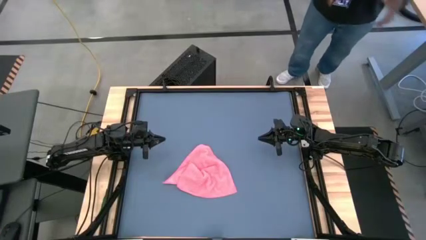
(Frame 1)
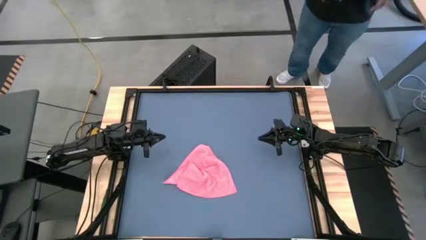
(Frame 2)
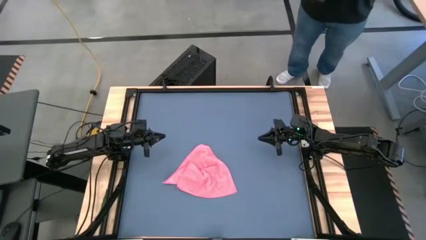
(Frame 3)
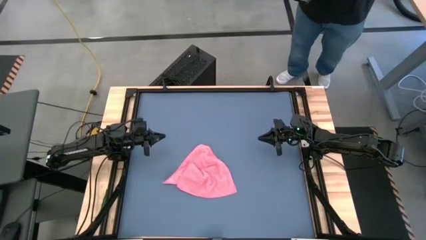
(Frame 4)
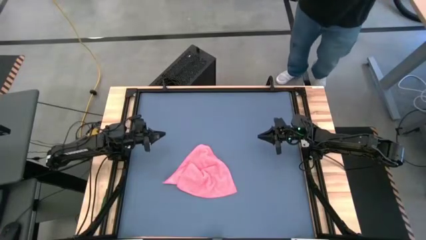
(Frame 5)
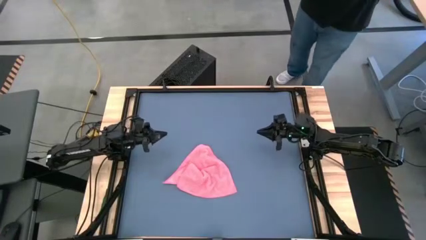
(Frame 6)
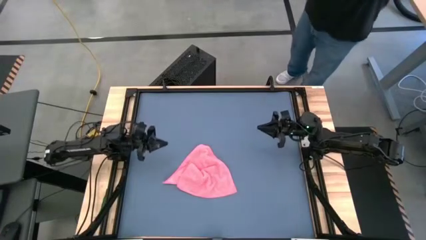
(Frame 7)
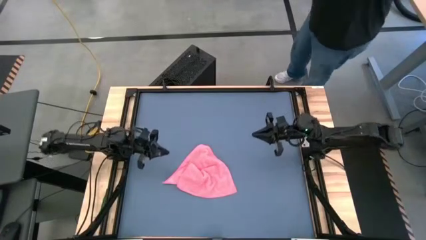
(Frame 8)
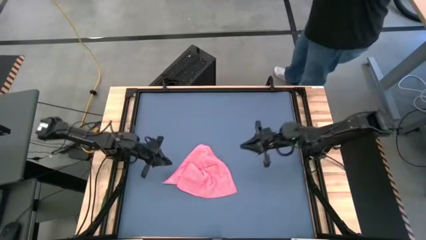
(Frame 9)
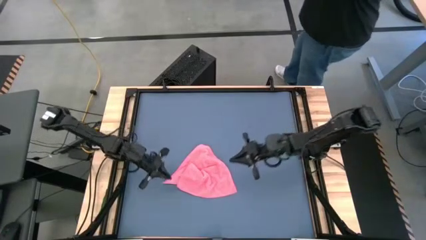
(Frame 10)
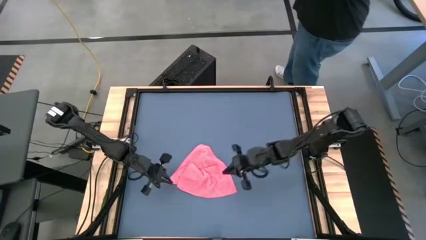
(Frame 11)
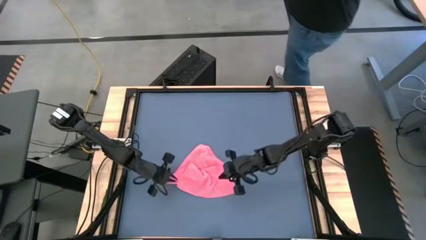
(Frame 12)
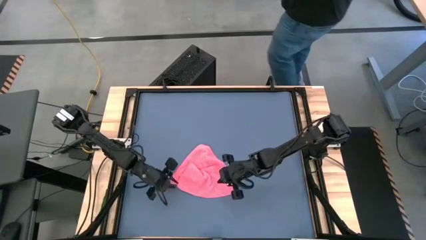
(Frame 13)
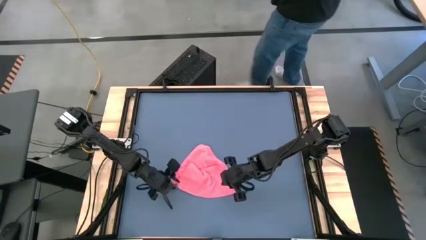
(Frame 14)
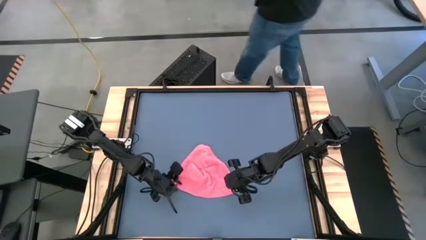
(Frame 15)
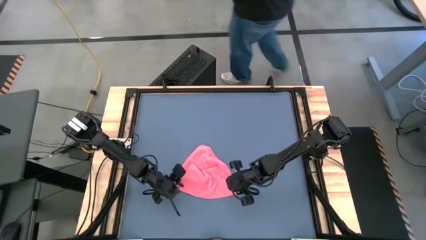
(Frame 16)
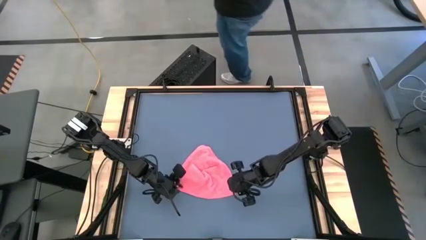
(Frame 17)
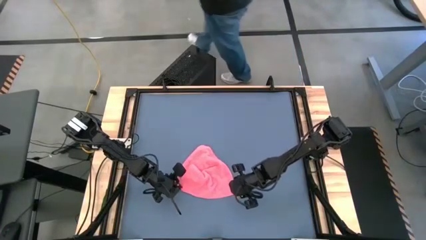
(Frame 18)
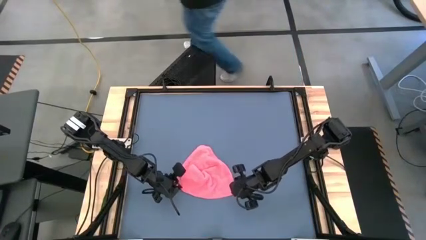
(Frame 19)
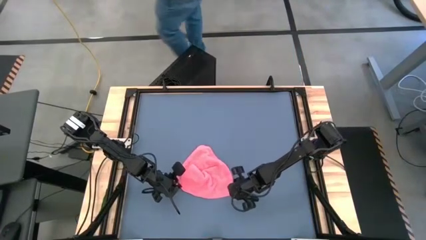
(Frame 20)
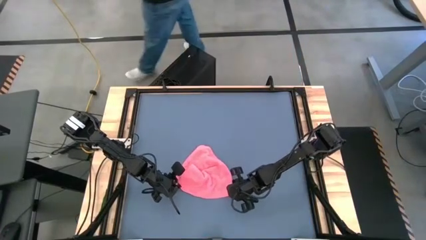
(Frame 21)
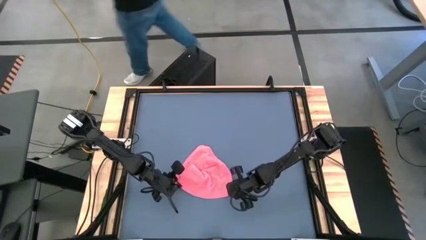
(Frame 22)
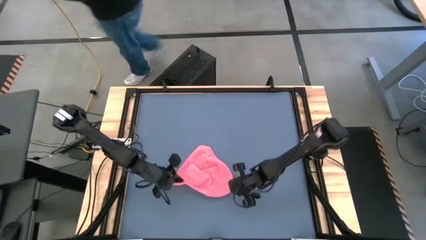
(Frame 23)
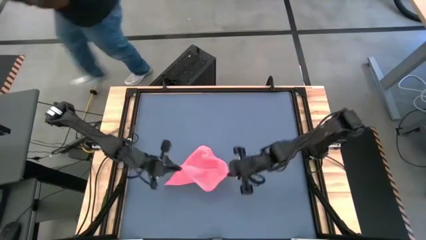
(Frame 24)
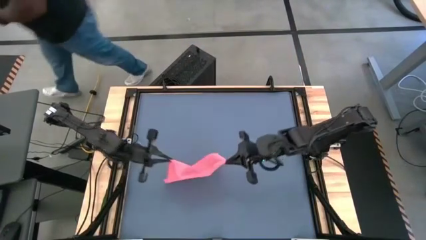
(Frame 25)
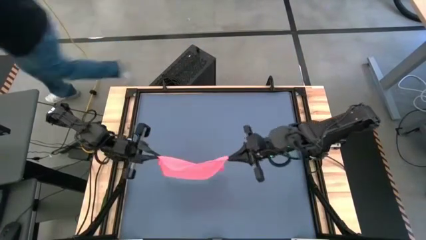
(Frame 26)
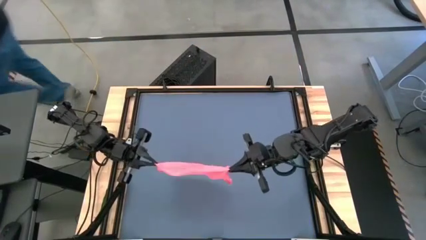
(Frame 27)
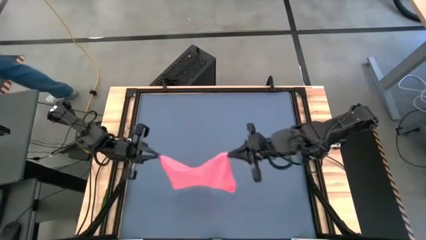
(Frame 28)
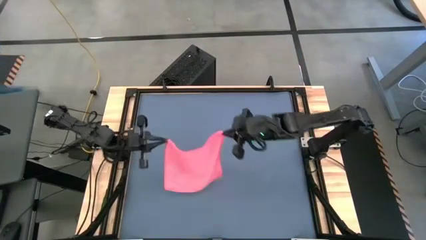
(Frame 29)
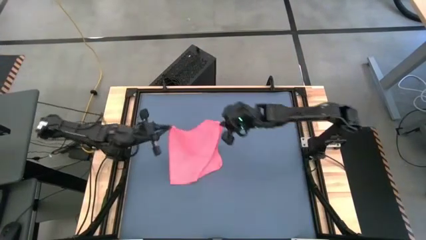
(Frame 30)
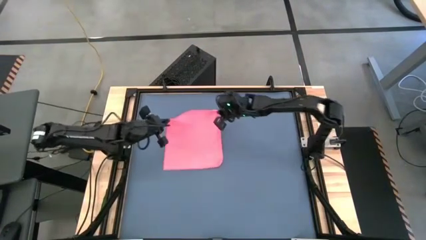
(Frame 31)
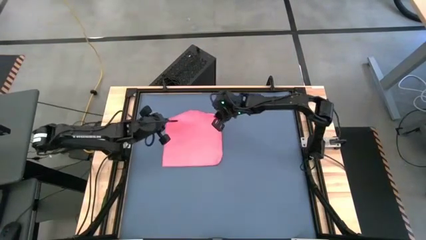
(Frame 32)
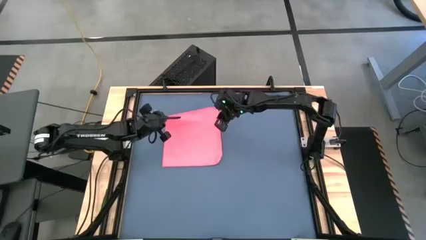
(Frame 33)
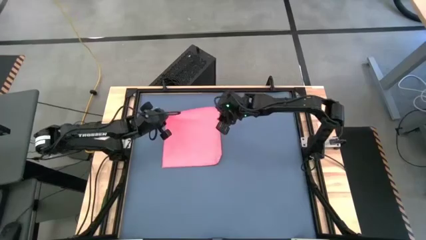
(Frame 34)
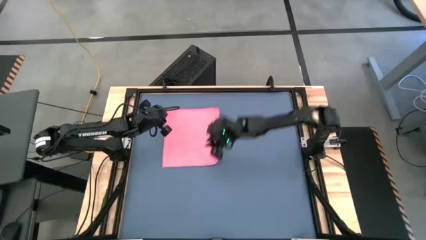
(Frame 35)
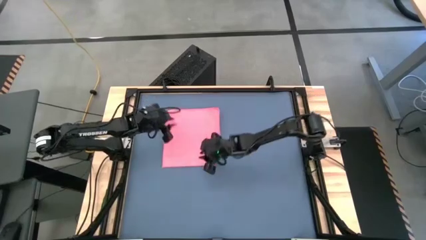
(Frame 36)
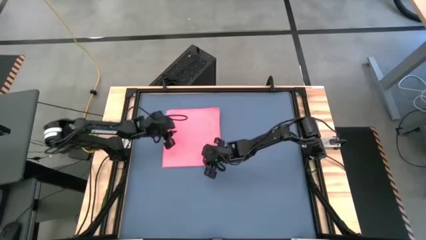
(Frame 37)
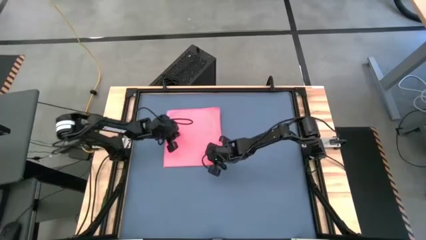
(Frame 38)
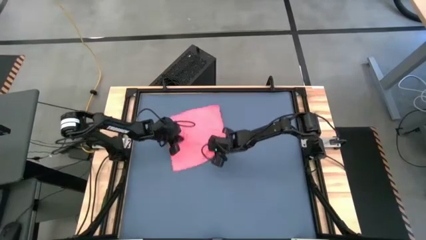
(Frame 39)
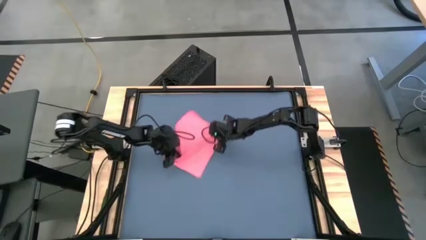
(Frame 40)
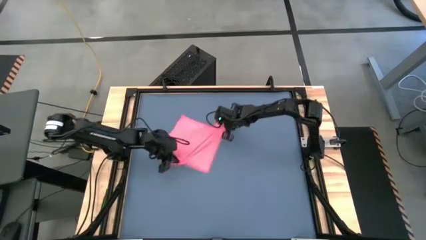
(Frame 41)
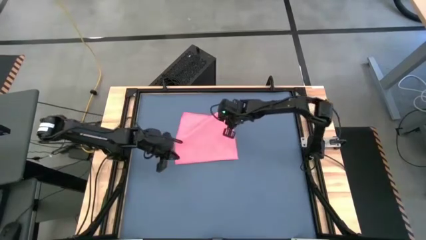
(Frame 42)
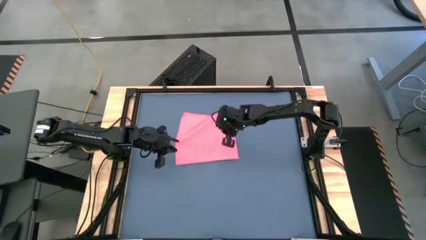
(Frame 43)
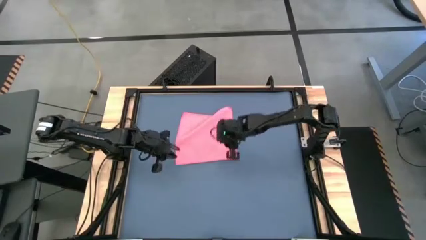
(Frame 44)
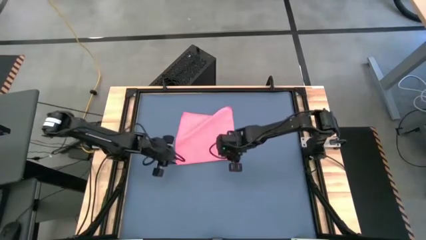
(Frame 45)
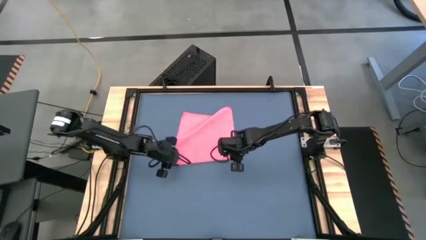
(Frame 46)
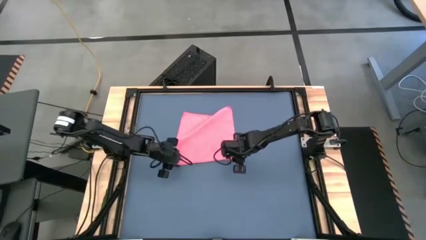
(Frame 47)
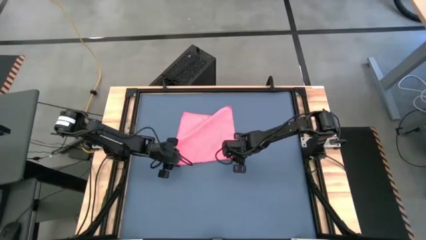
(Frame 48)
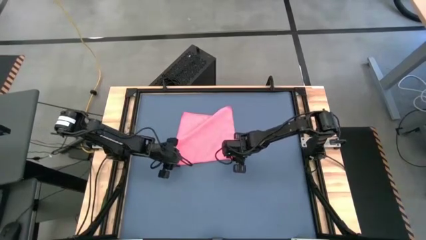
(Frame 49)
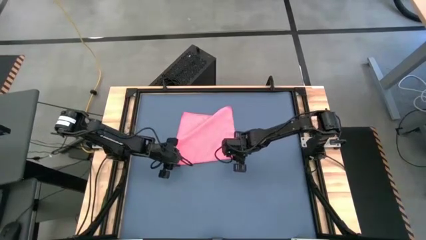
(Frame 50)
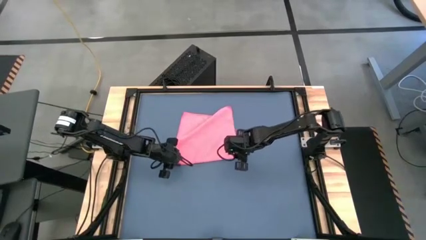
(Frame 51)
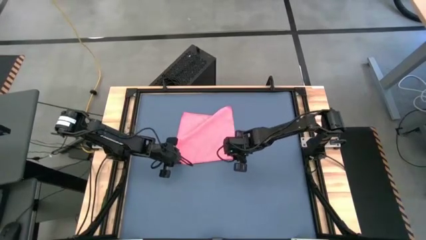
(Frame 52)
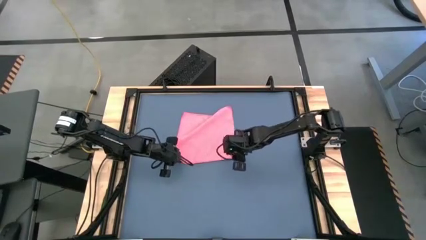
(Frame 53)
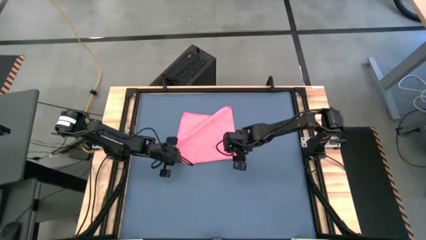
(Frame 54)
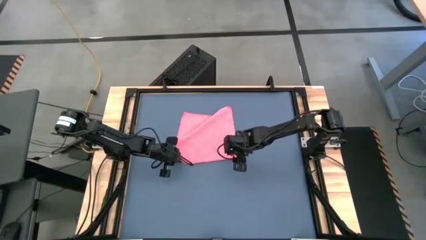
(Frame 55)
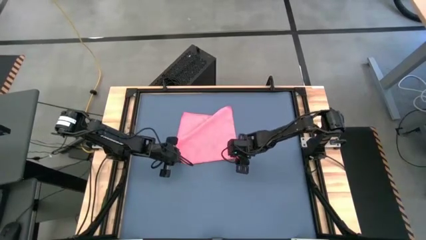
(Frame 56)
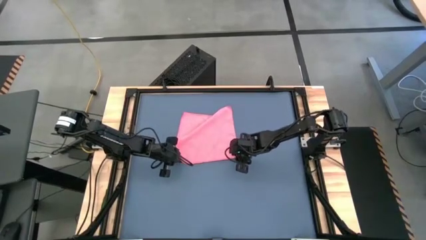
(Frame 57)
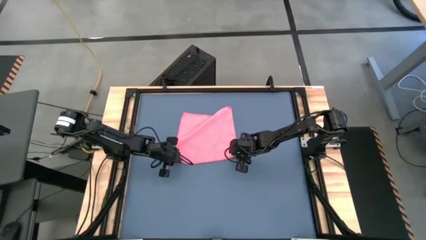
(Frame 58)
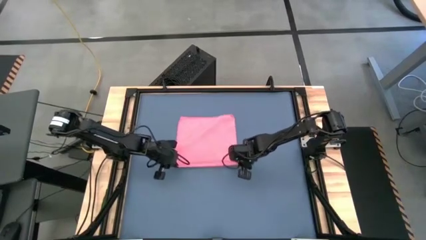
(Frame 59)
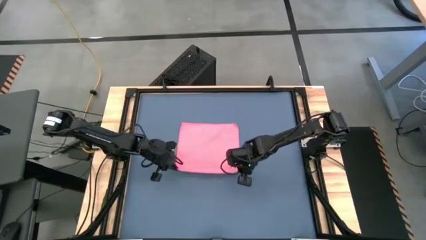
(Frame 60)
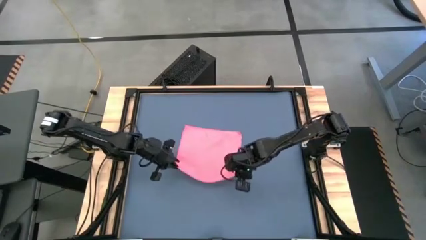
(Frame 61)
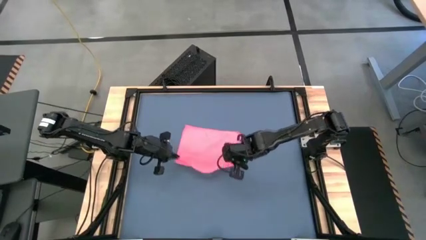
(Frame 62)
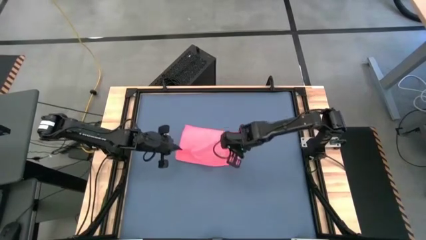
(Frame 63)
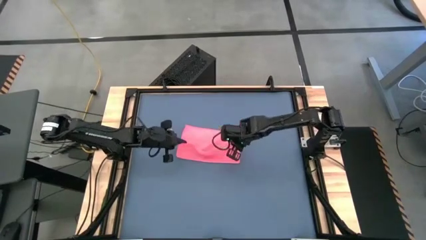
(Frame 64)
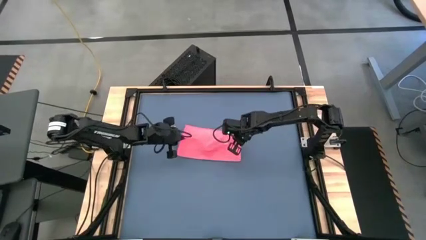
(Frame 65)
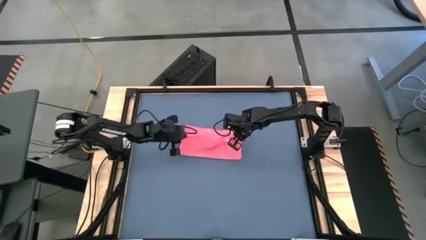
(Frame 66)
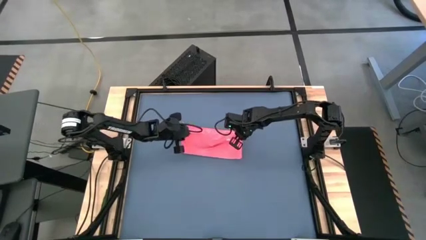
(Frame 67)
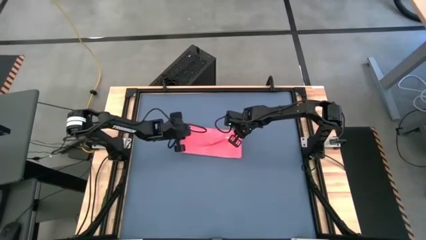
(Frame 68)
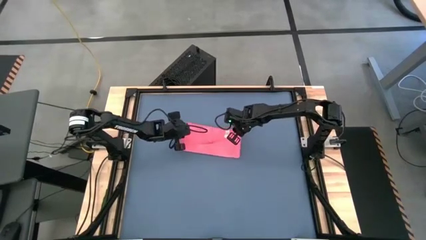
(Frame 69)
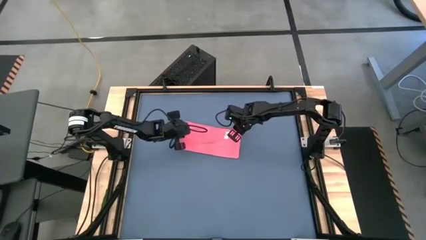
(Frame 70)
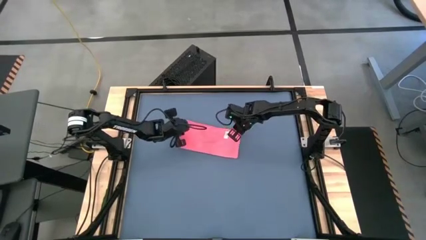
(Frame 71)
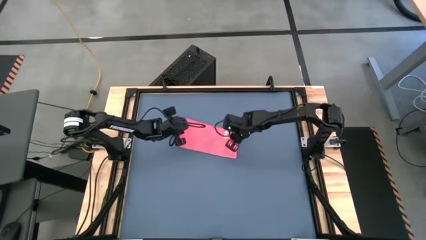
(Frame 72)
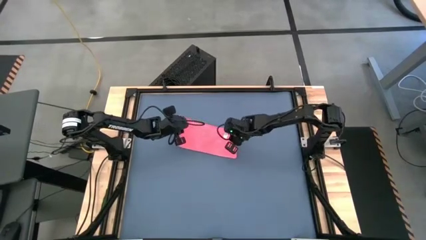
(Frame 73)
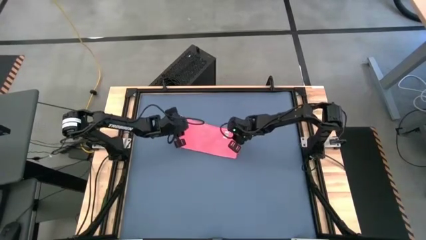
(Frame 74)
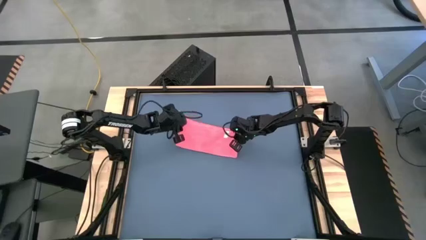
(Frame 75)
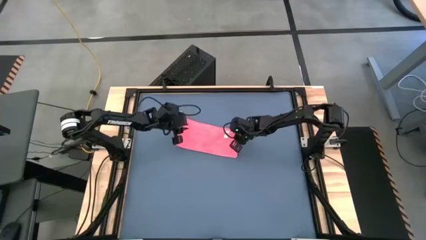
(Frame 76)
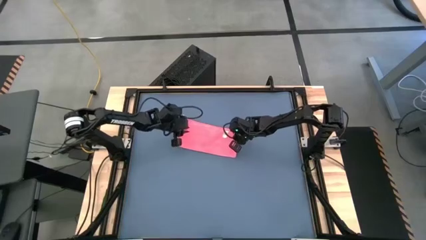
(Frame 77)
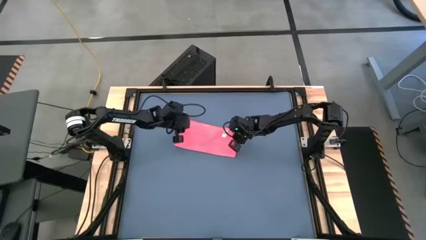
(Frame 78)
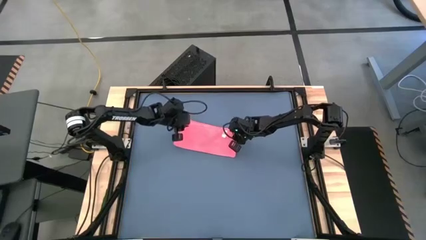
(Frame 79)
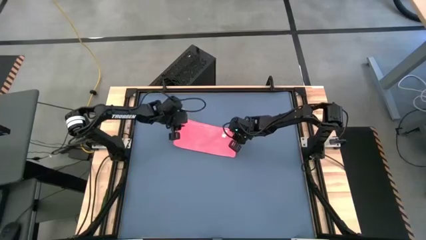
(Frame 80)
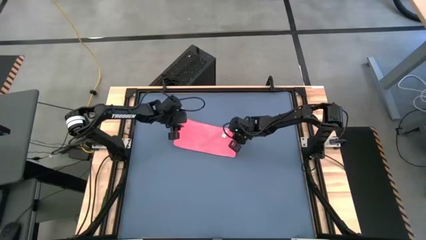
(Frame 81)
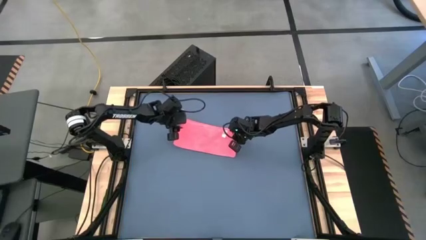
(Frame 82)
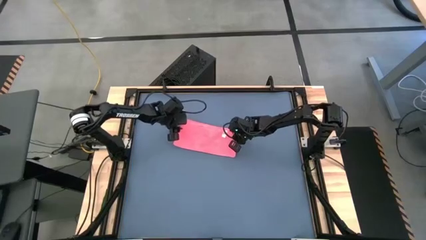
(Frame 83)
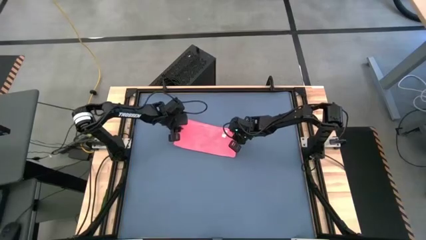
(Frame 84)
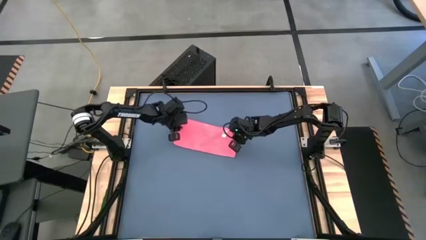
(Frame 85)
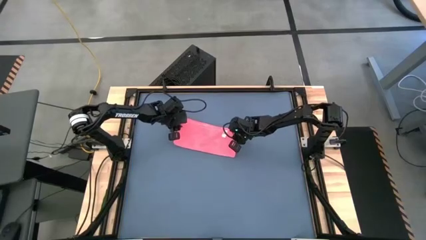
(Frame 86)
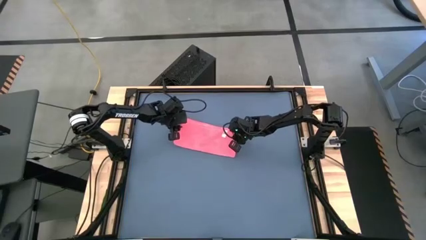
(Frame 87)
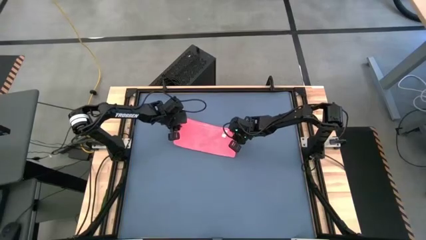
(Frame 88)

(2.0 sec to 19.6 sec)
Task: Roll towel into tight, uniform cylinder
Roll the red towel
